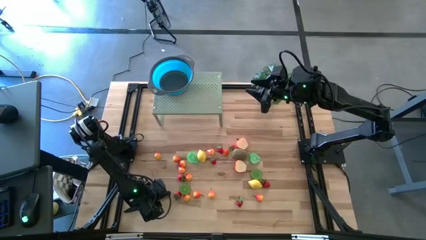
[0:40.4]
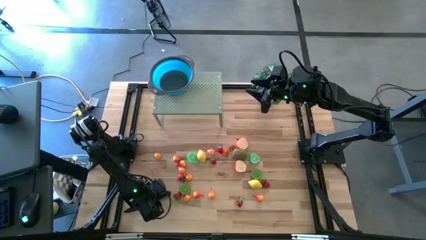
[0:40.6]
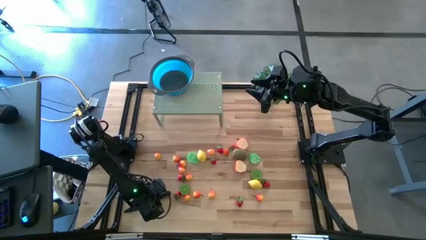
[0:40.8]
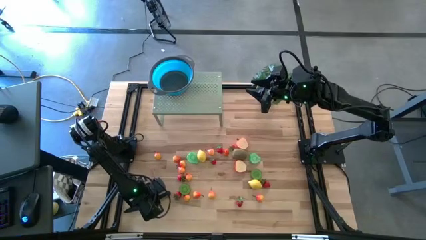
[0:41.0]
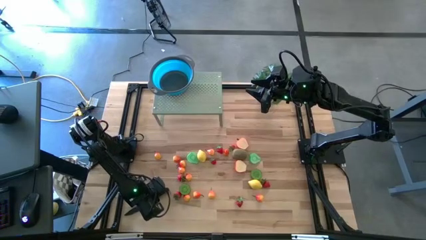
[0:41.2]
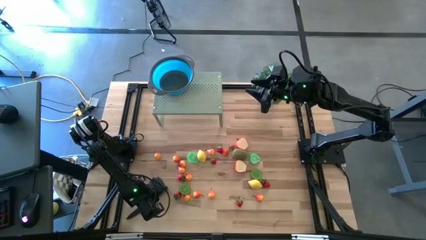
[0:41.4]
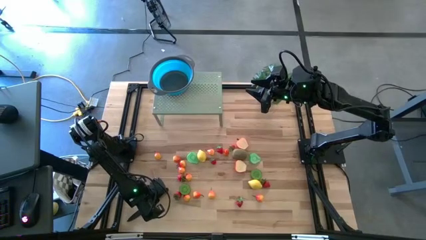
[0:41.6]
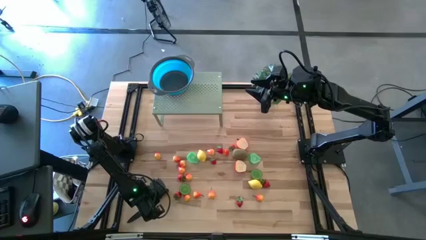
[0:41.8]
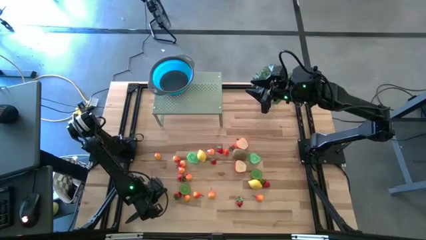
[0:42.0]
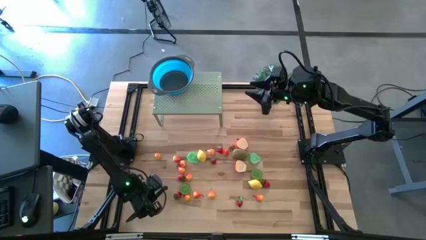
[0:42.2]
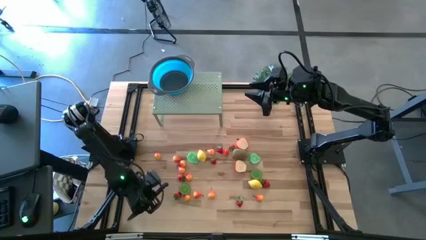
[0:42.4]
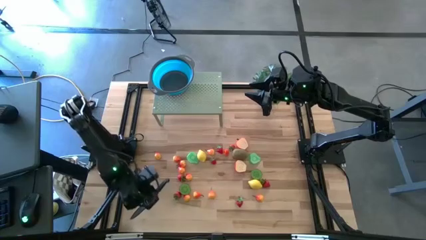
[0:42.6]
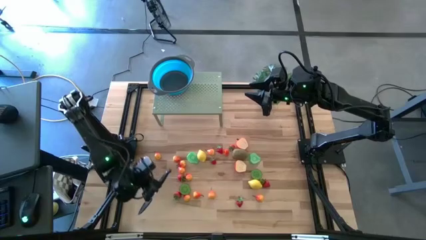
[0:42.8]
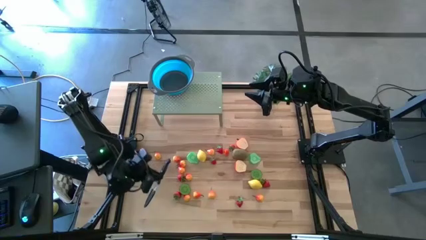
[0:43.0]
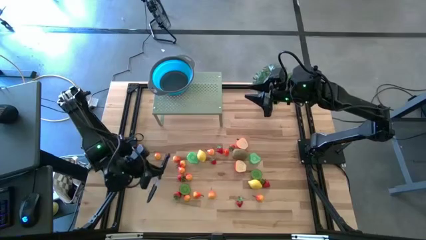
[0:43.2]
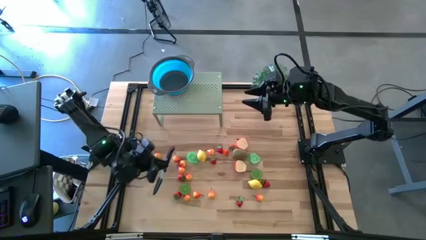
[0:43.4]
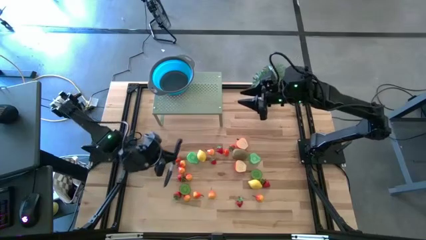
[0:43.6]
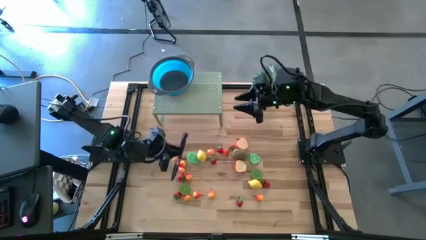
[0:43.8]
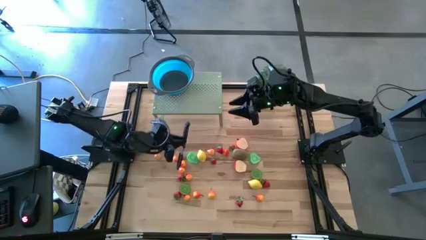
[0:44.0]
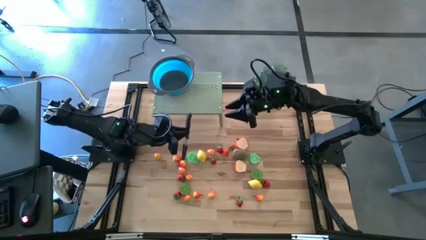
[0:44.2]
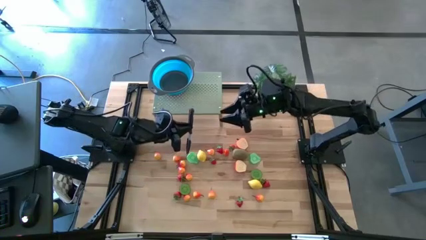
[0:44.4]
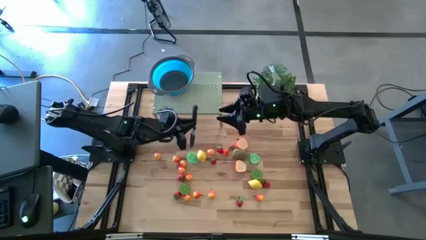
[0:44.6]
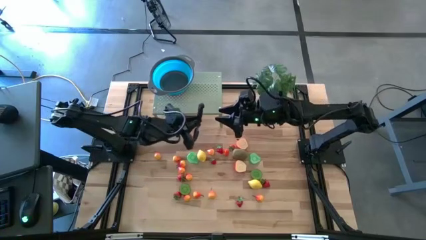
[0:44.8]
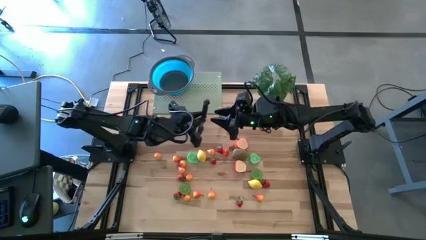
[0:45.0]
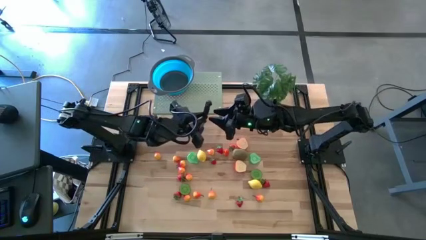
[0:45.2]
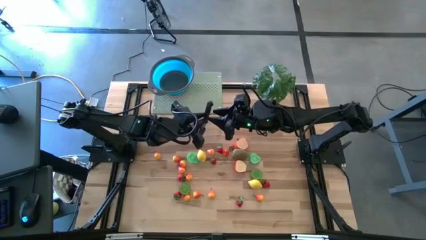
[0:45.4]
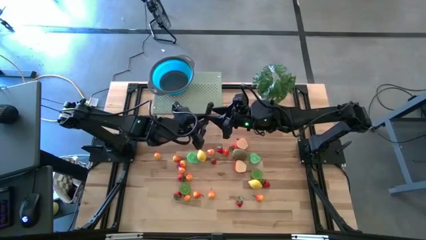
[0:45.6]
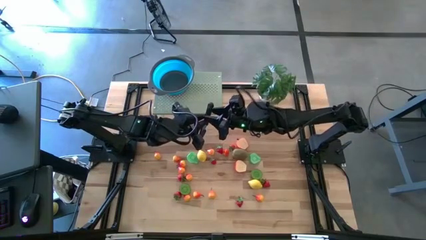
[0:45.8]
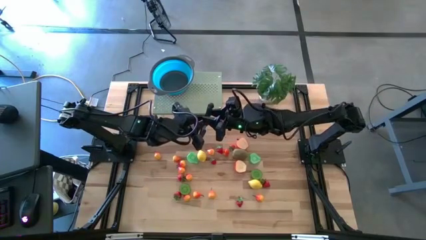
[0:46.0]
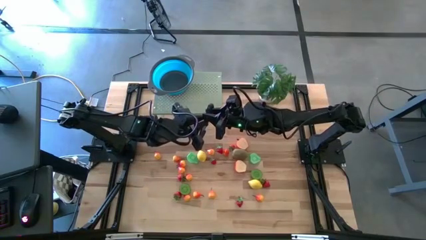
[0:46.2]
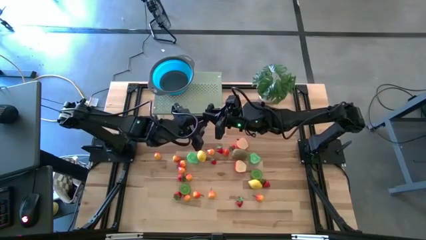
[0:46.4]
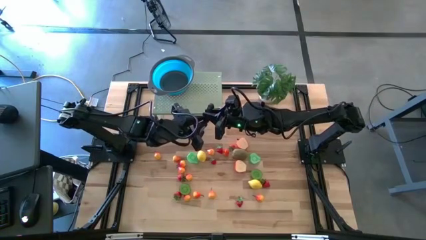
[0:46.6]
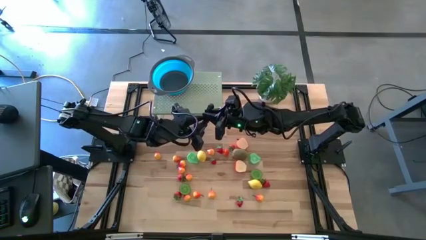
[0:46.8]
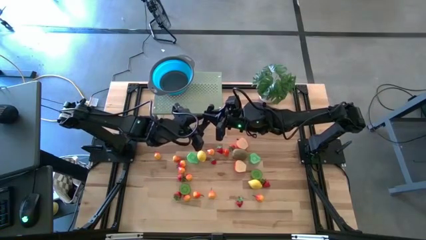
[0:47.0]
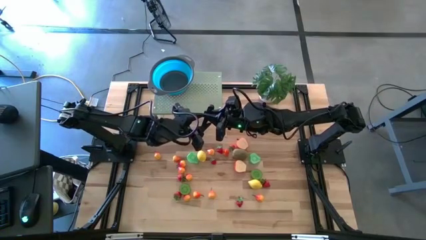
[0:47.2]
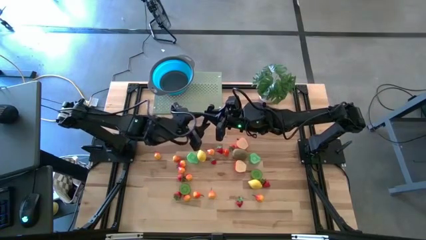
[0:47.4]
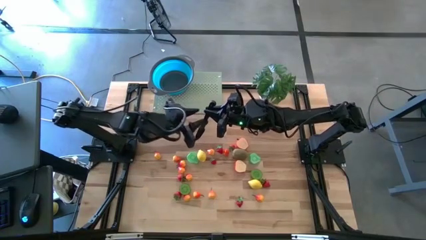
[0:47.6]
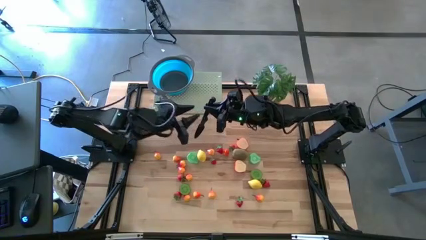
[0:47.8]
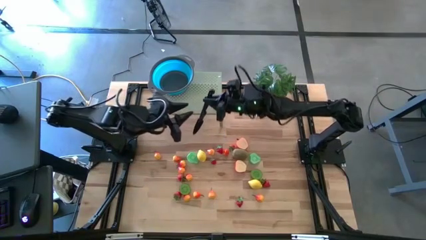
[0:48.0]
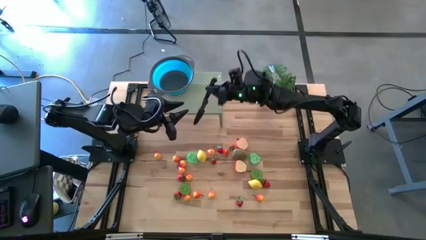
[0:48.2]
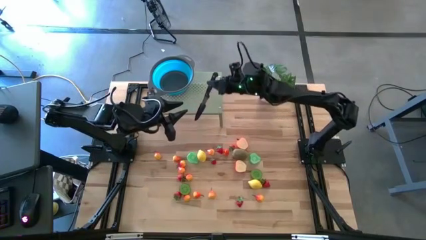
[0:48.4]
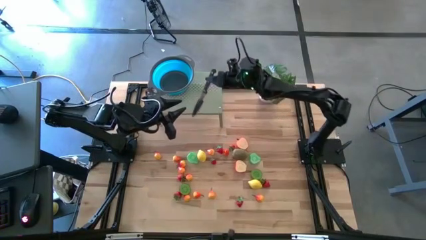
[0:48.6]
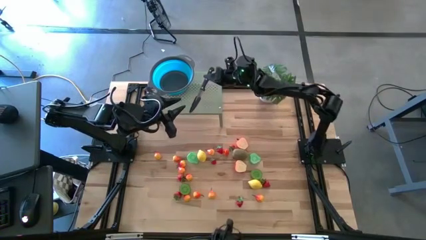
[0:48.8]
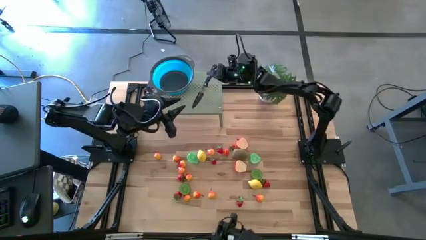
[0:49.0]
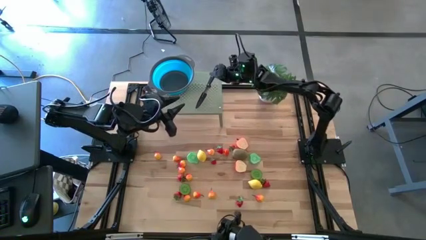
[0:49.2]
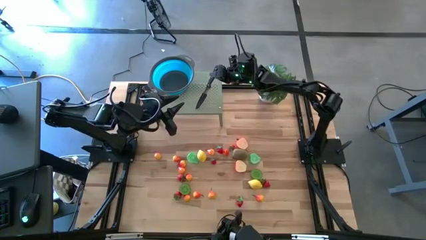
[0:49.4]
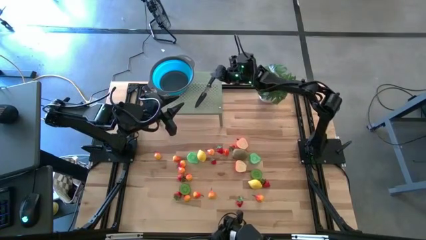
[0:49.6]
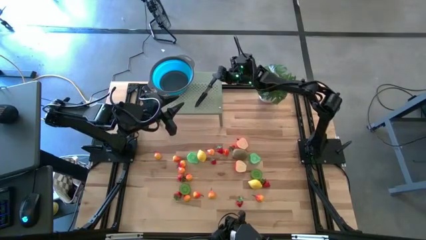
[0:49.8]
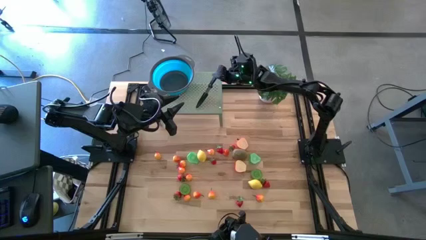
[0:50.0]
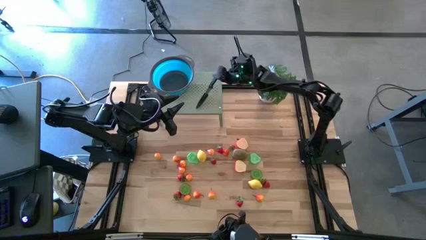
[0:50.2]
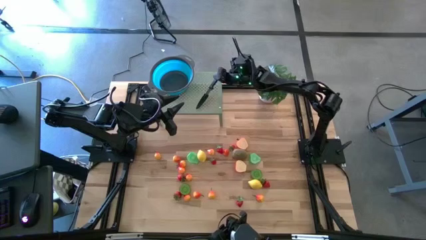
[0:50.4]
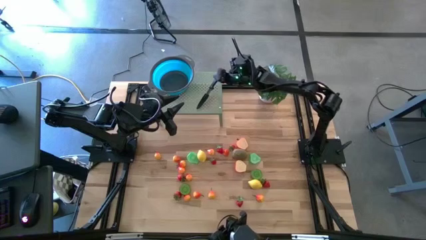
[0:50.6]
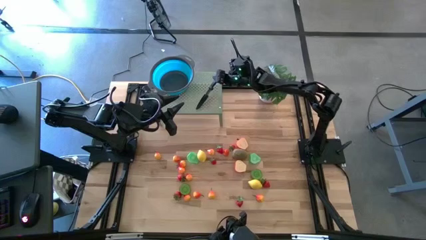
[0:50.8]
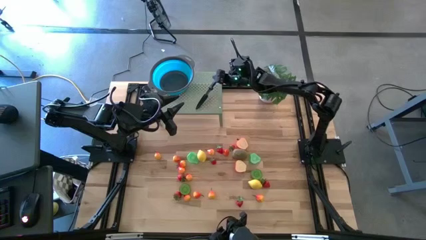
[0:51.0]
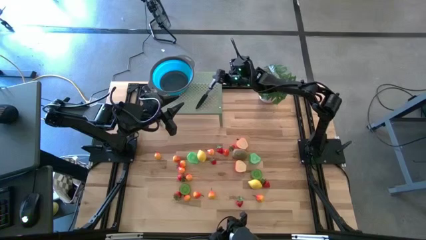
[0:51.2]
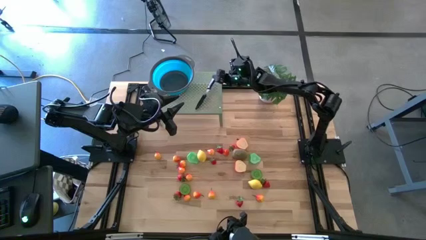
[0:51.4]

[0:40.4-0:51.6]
Task: Pick & Place Fruit
Put the black knife on the shelf

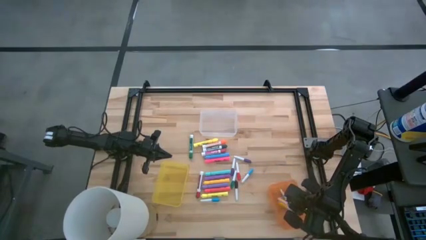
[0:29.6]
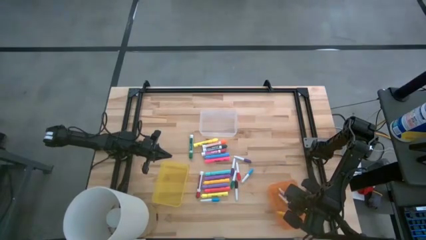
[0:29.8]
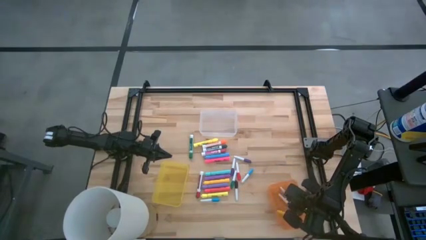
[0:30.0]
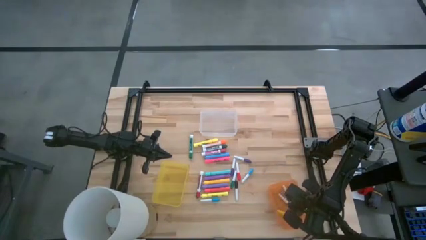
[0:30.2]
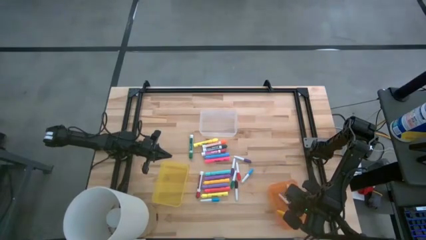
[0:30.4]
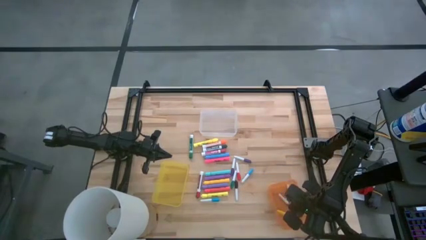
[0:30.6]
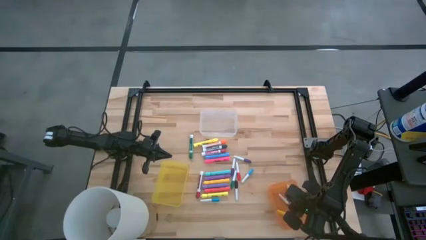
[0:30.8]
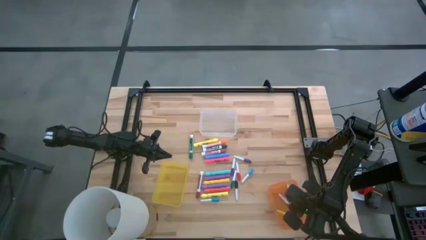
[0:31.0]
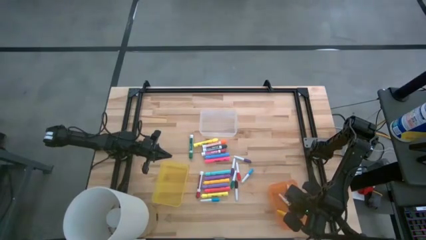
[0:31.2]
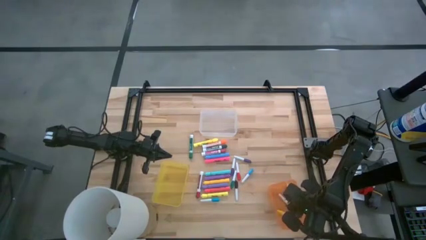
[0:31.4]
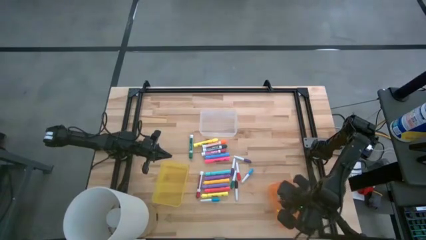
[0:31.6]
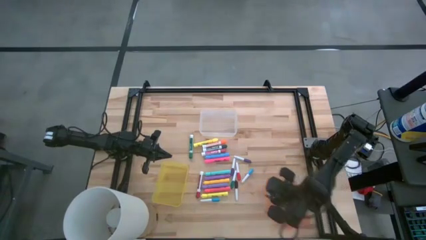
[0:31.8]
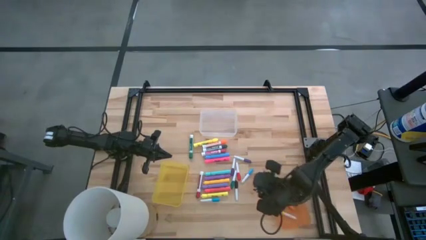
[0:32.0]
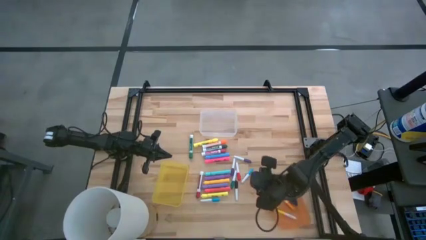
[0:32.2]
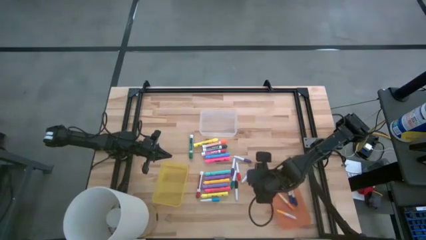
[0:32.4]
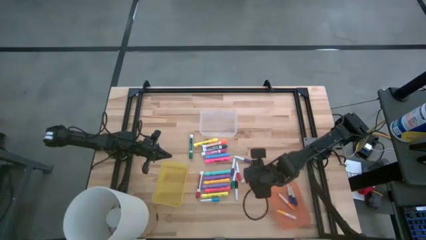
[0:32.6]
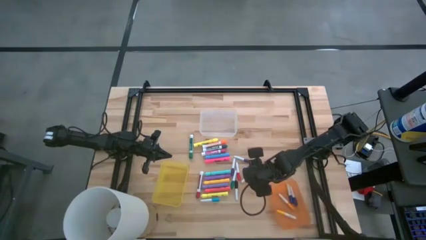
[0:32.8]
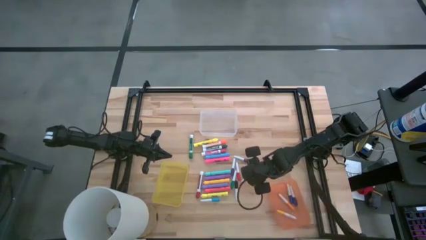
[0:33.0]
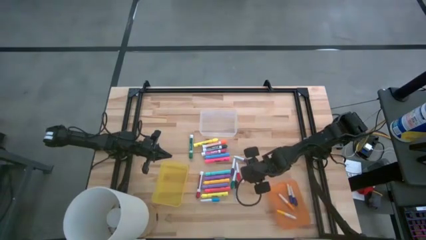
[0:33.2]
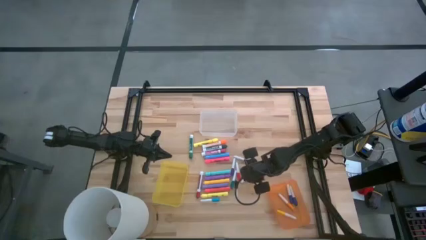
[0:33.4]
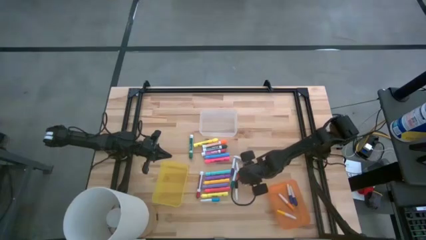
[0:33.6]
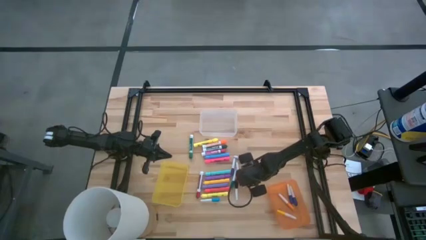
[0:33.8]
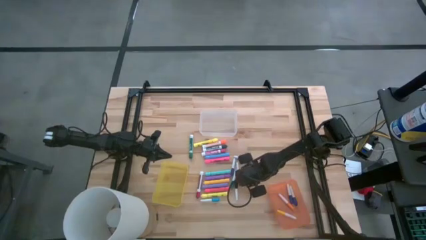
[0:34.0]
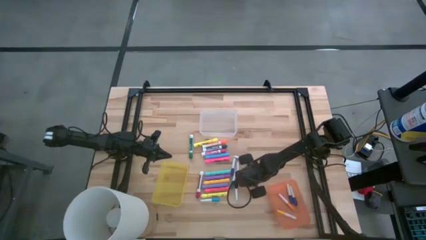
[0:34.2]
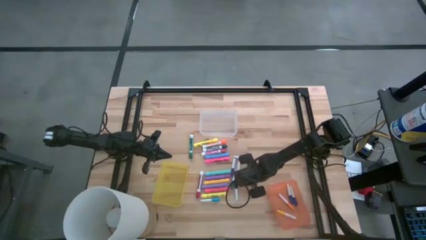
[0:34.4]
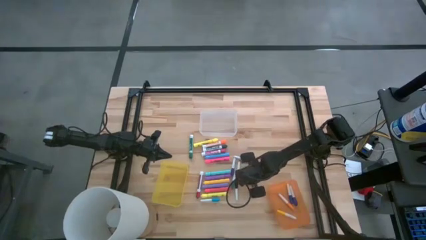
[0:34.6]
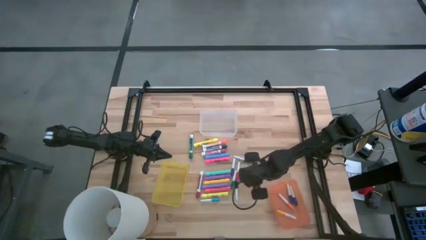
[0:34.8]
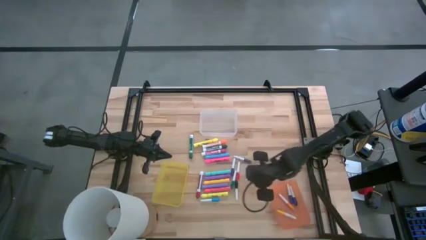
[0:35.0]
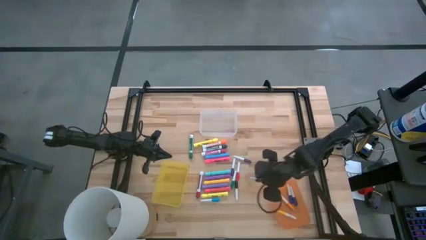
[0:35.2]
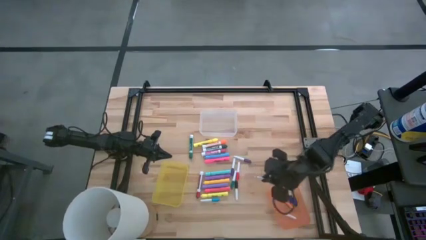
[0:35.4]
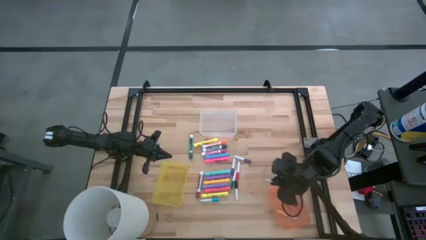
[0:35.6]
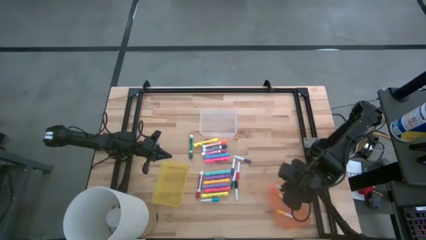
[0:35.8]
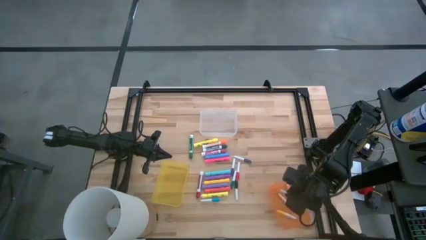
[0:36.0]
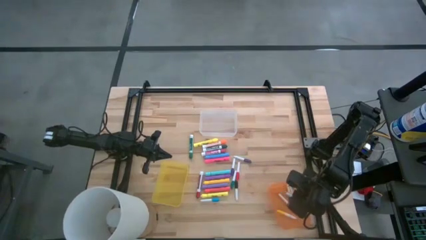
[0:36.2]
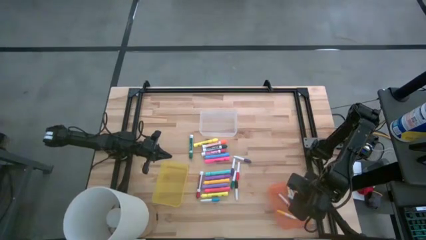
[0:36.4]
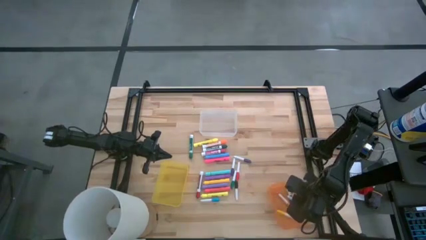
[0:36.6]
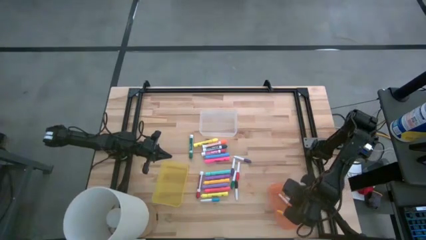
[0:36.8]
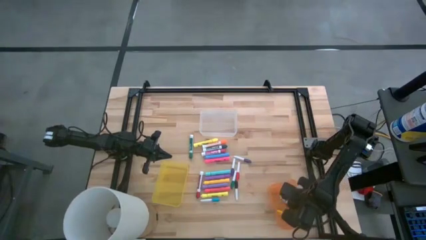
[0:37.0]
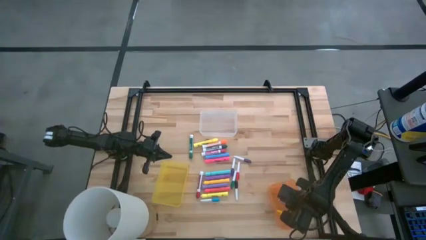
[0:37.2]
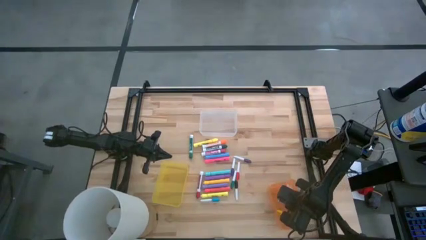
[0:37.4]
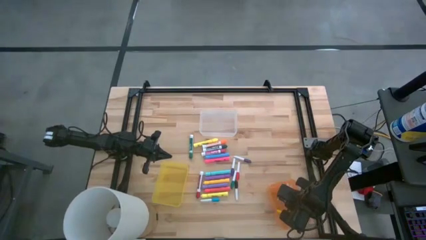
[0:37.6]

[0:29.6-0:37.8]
Task: Pick & Place Markers
Put the top small blue highlighter pen into the orange bin
